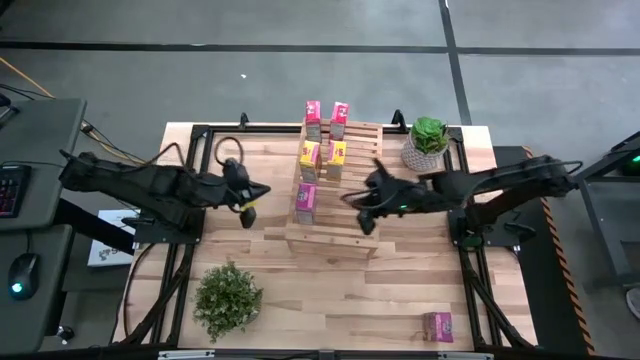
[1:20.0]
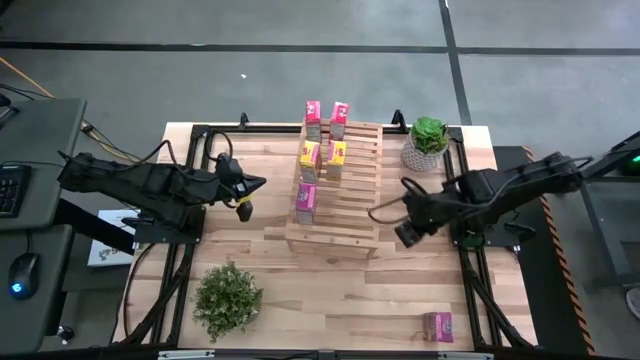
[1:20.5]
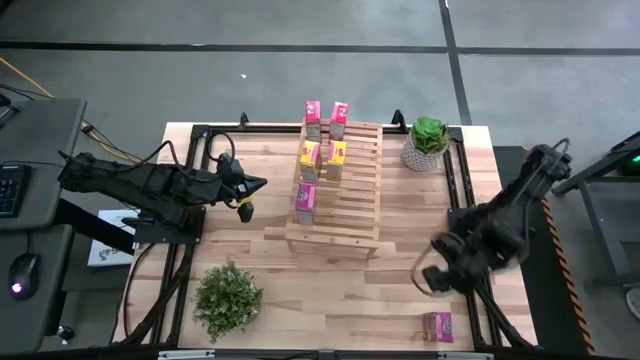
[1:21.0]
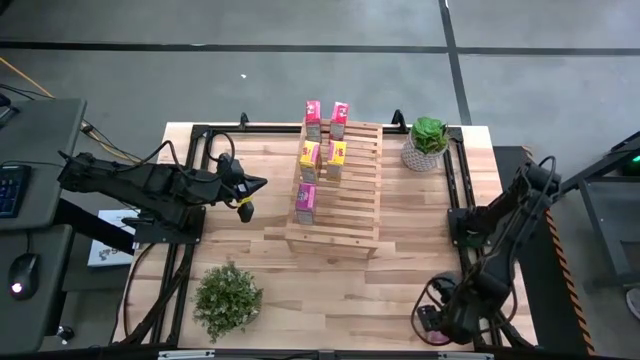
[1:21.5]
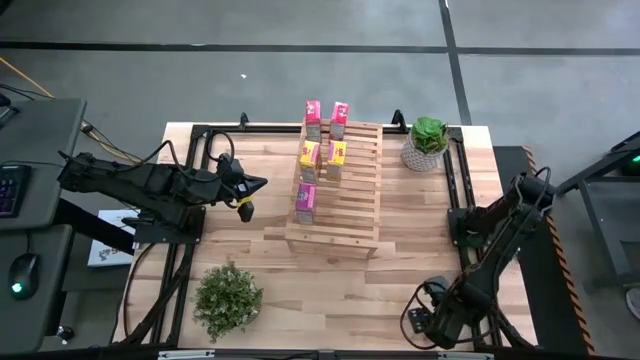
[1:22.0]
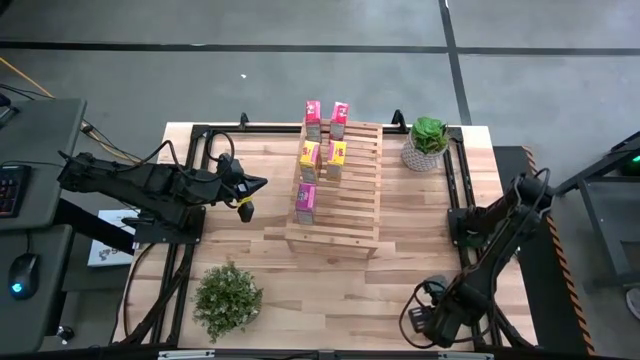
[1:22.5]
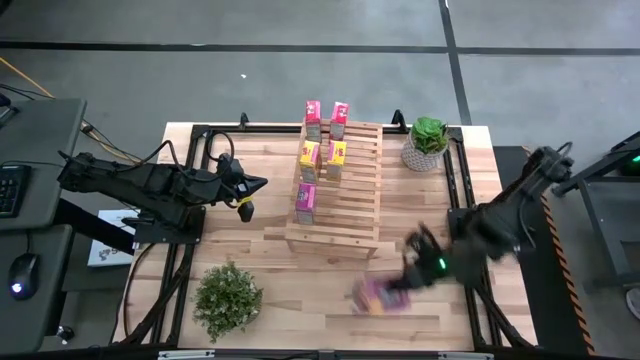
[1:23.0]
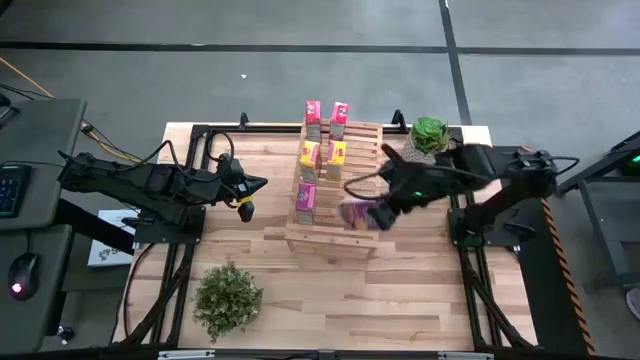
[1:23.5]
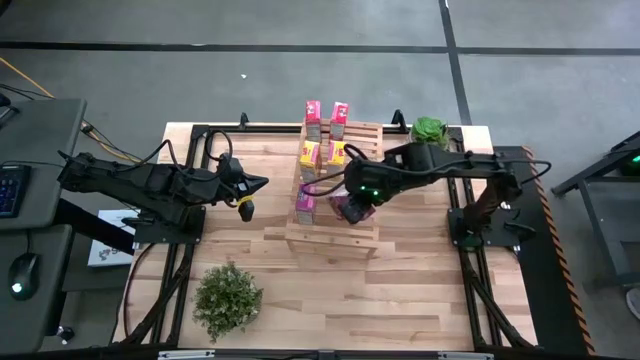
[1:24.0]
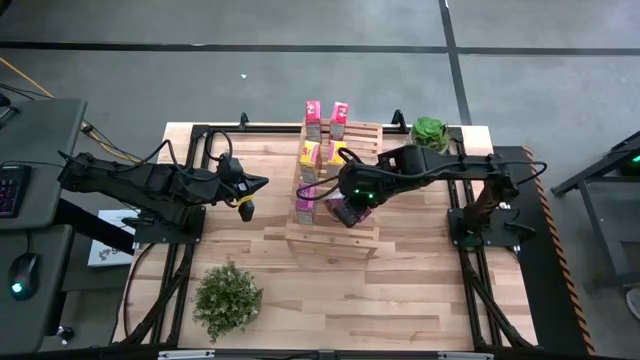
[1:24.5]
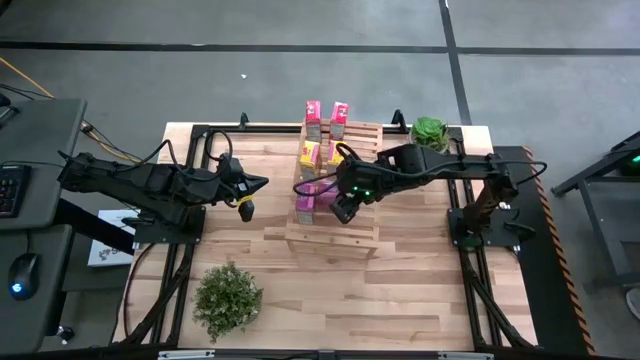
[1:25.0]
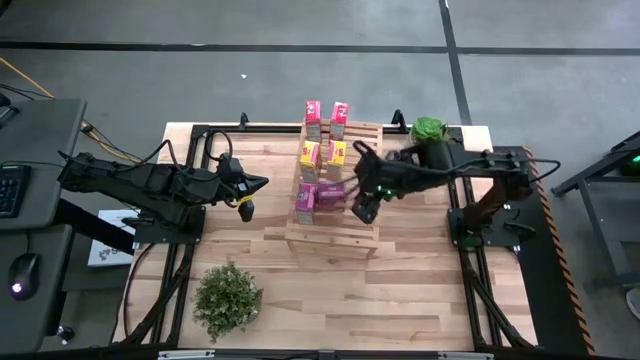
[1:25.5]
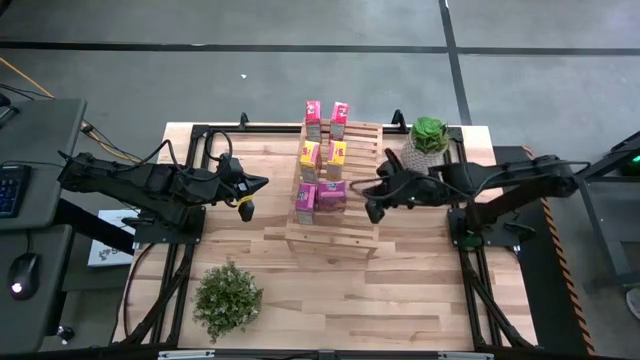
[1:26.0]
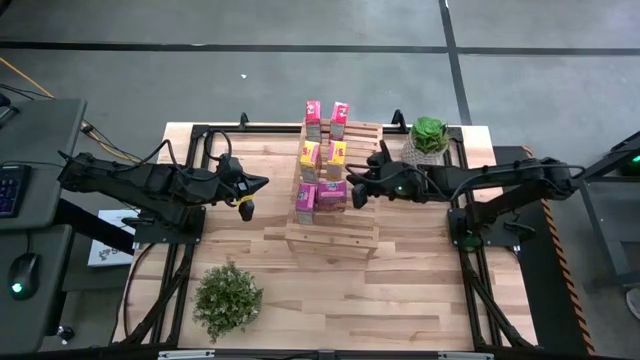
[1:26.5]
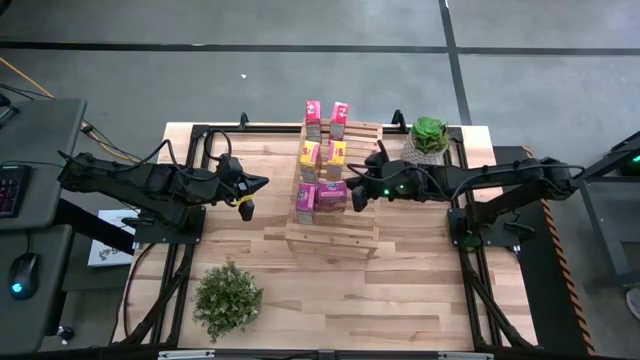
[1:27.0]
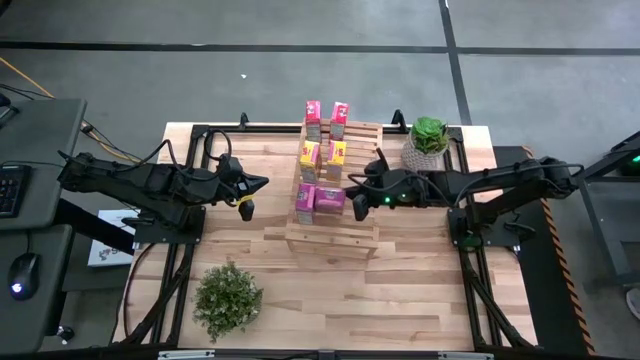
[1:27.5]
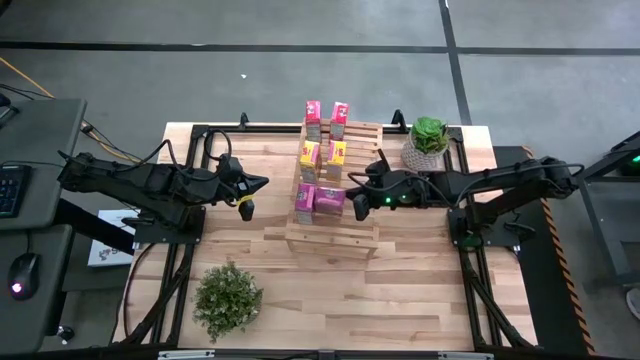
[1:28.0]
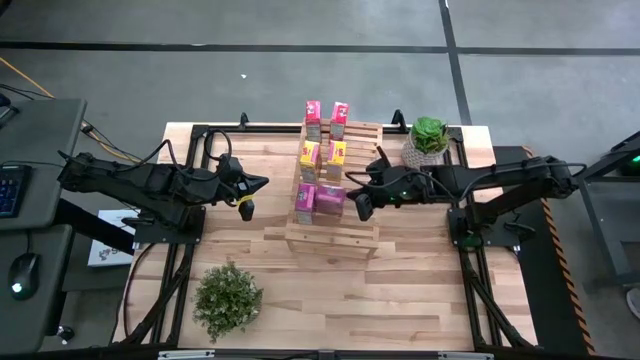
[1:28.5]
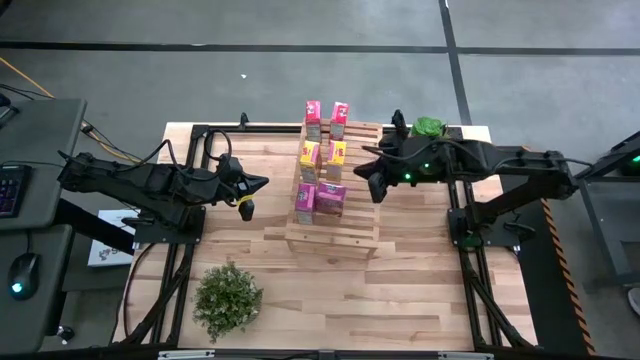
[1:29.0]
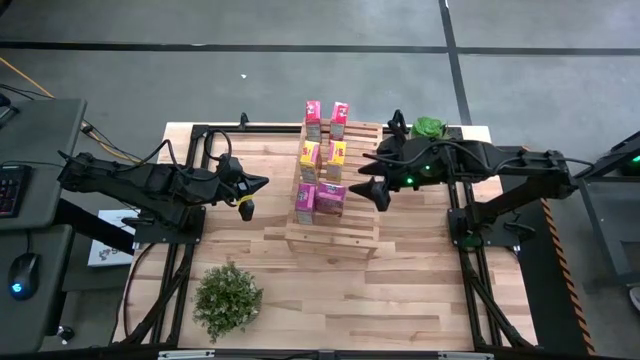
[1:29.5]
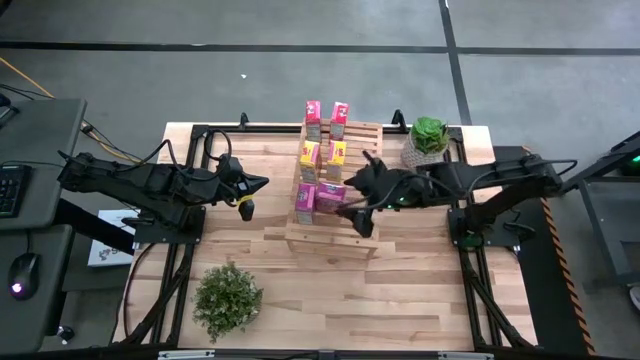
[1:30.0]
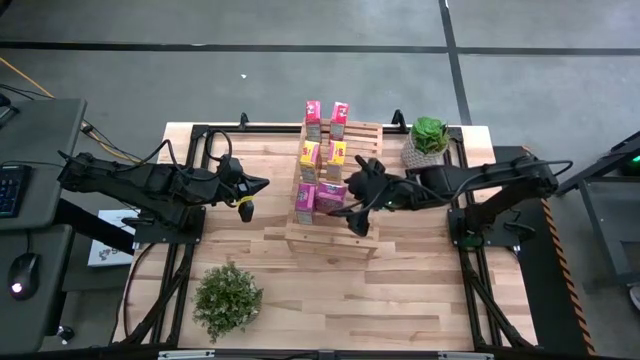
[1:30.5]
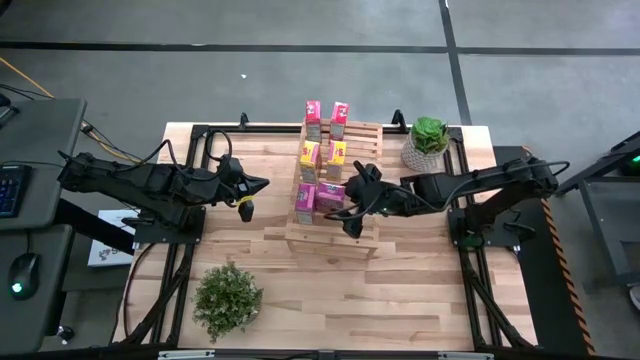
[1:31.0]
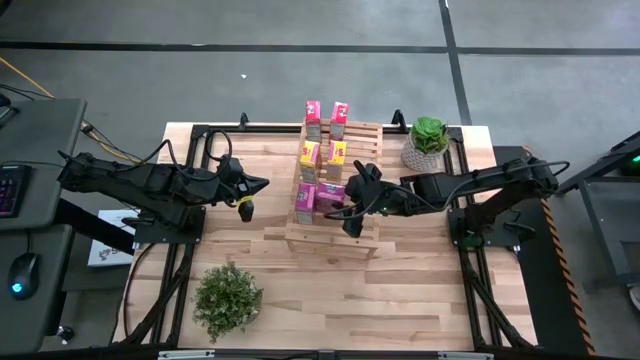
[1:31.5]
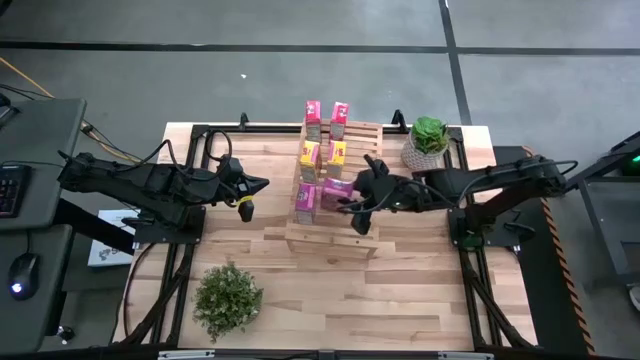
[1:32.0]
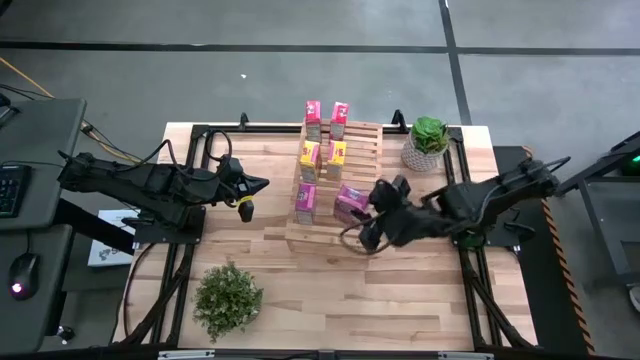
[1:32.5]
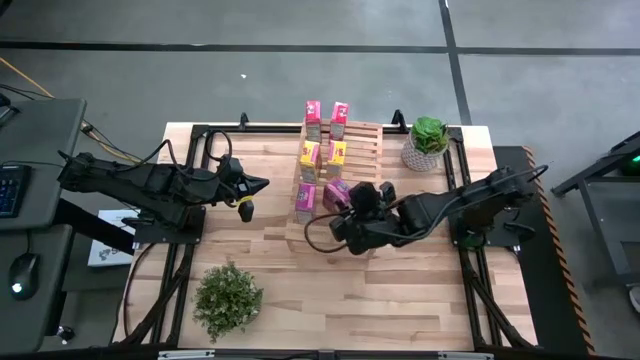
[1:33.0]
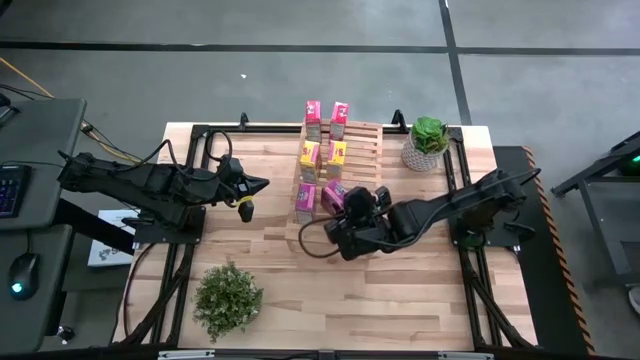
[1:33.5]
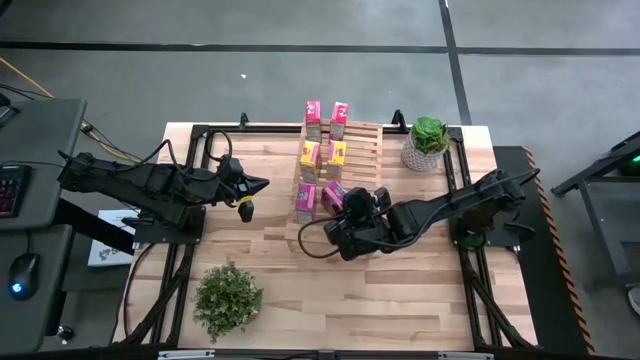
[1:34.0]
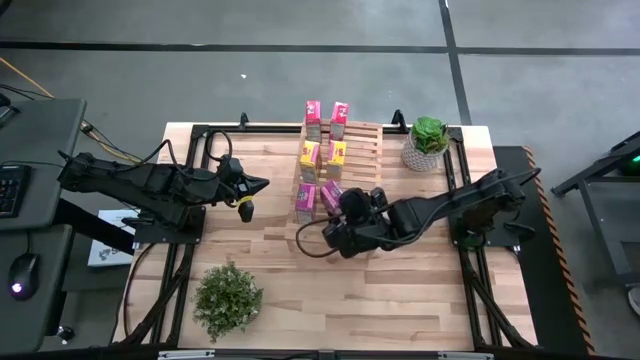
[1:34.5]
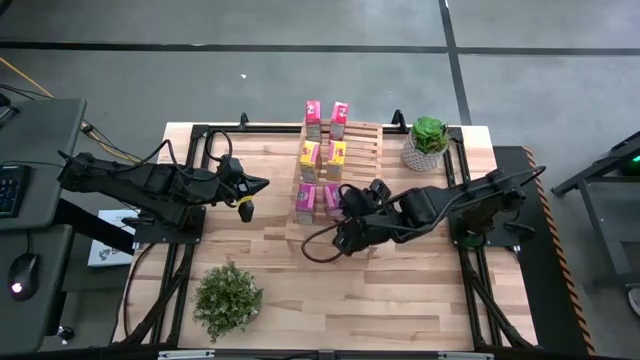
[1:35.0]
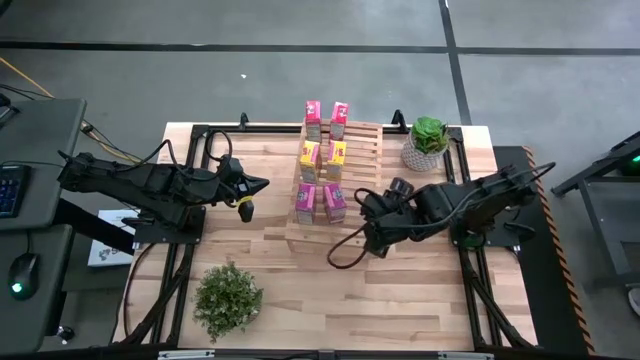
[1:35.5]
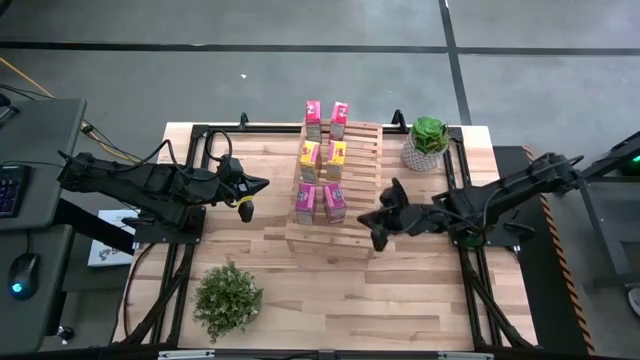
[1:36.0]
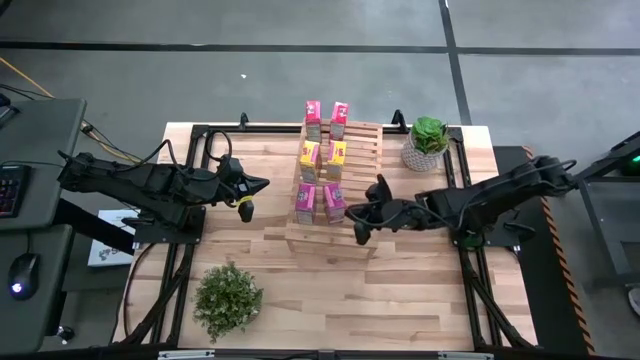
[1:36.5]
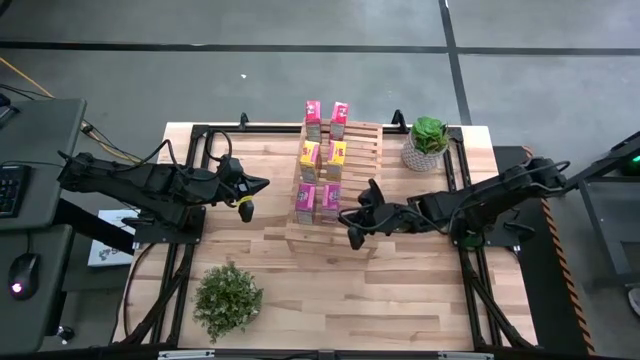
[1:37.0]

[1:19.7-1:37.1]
Task: Stack cereal on shelf
Put the purple cereal box on the shelf aligned with the purple cereal box

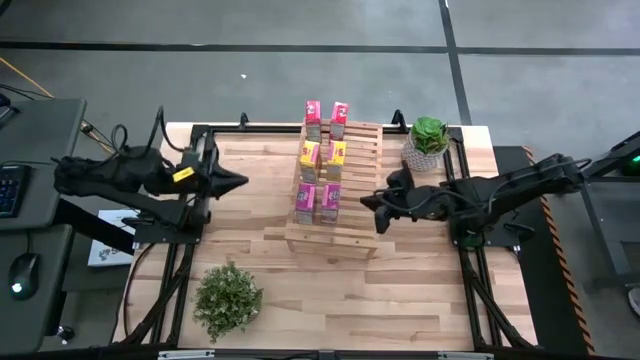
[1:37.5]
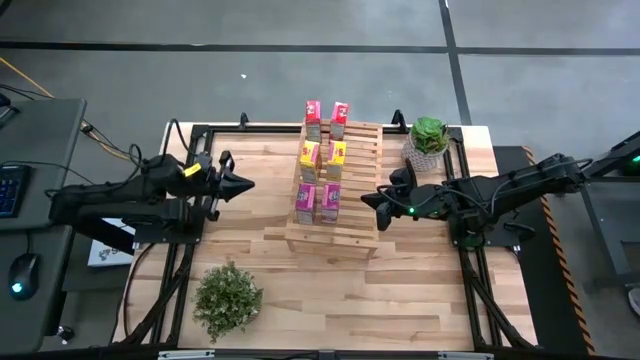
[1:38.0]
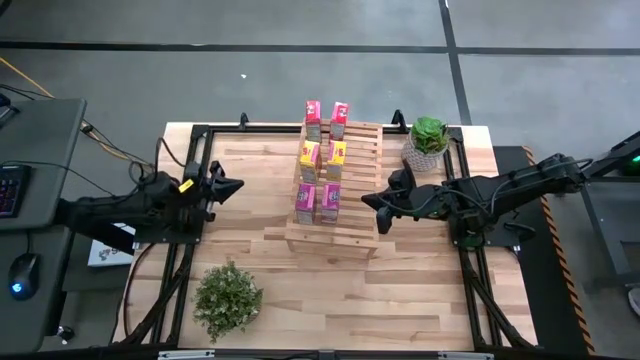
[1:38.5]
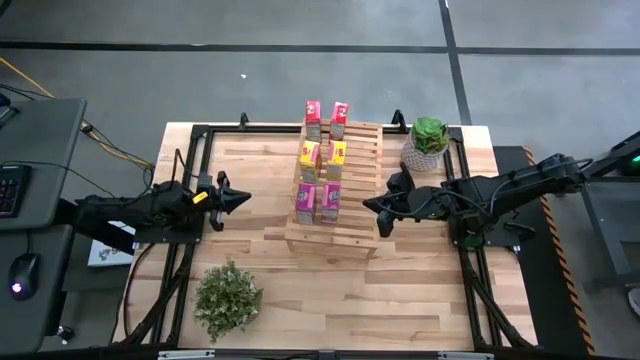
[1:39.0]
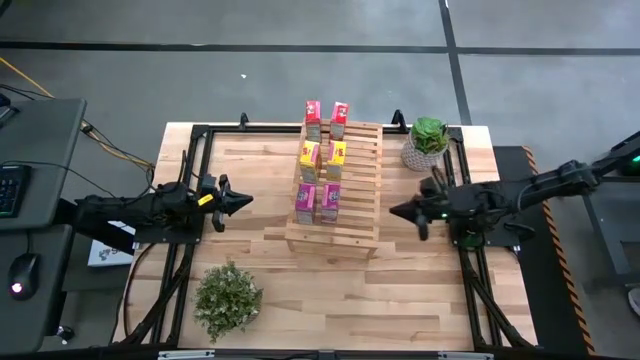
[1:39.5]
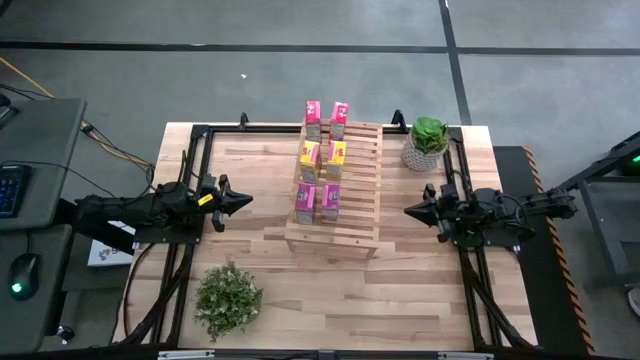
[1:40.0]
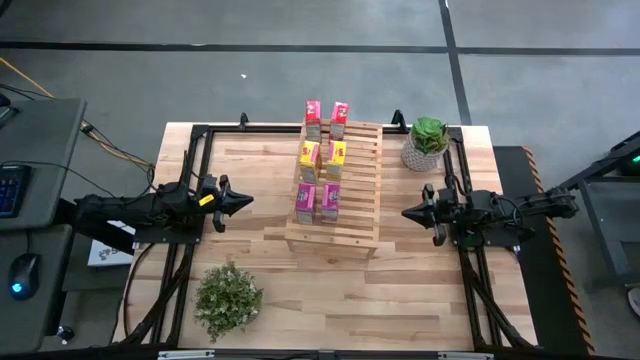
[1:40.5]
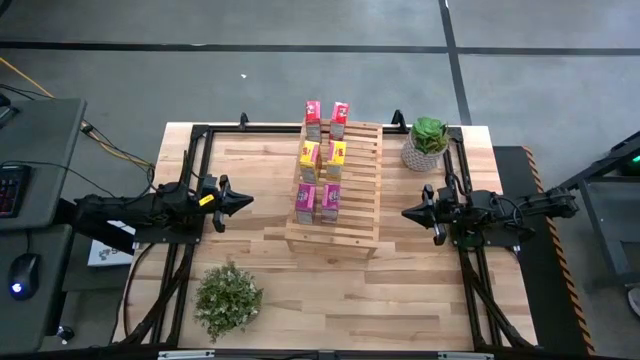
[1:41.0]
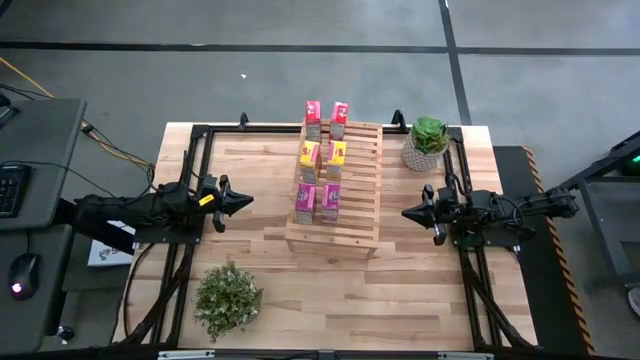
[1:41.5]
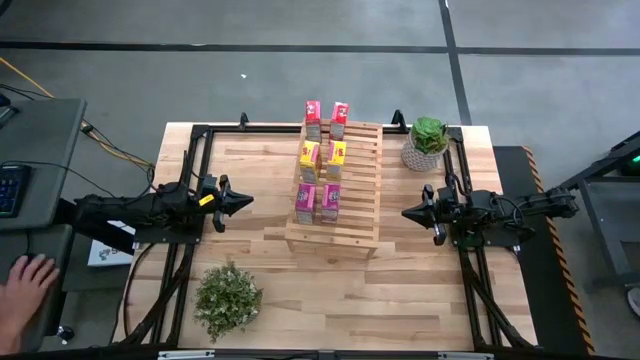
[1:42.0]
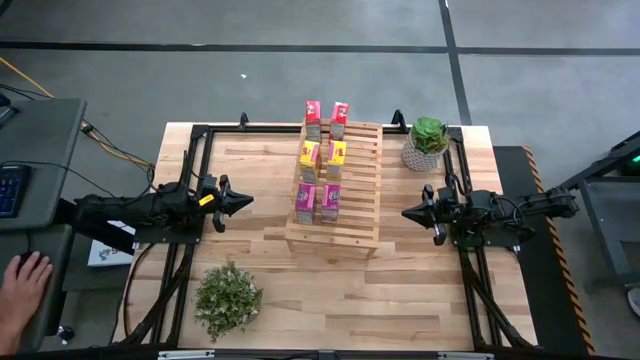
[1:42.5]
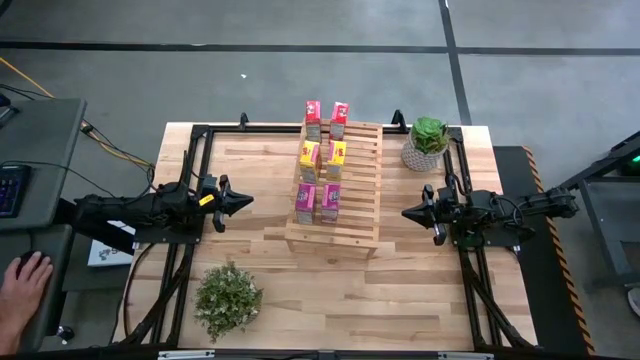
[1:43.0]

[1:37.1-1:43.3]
Return to Home Position
